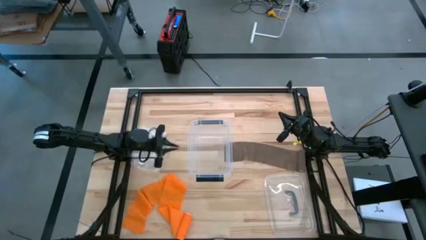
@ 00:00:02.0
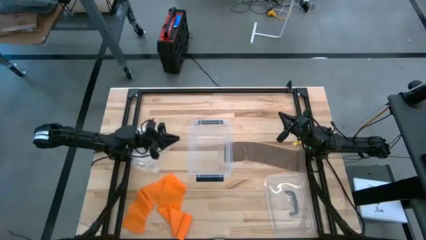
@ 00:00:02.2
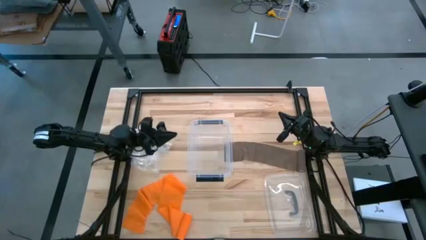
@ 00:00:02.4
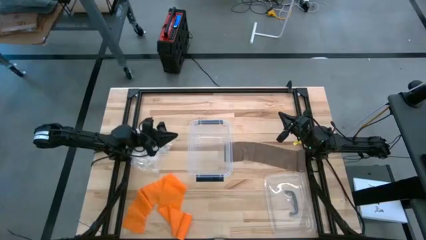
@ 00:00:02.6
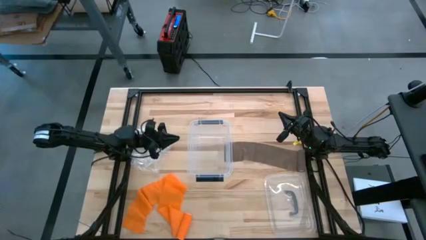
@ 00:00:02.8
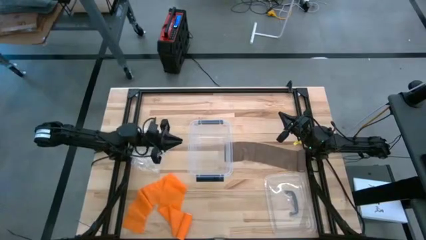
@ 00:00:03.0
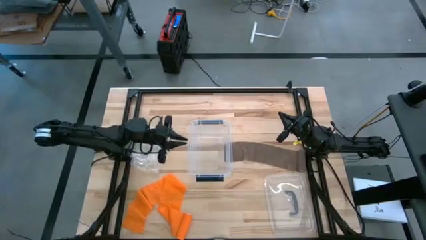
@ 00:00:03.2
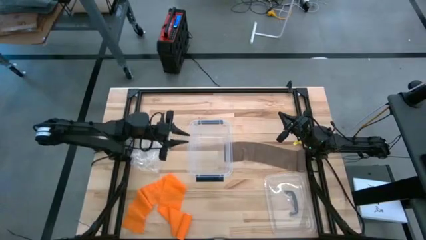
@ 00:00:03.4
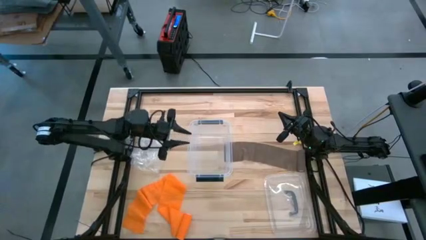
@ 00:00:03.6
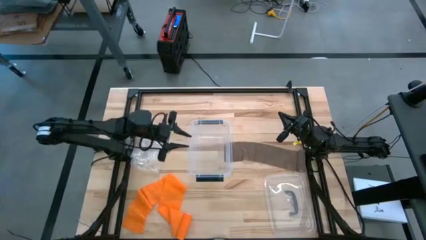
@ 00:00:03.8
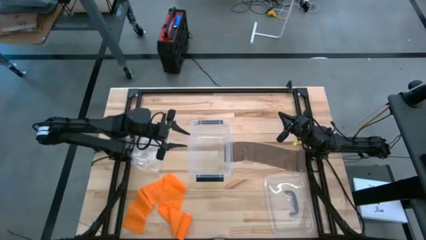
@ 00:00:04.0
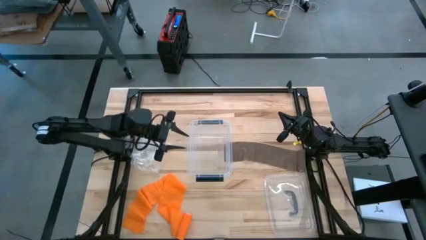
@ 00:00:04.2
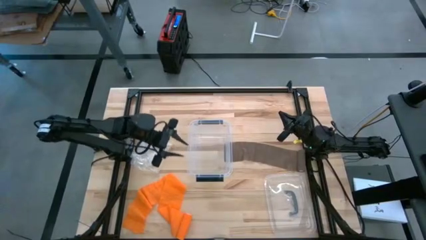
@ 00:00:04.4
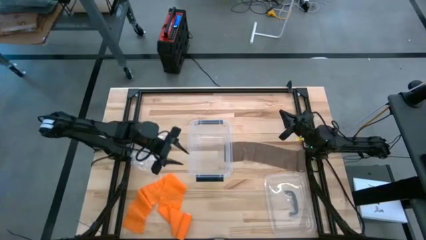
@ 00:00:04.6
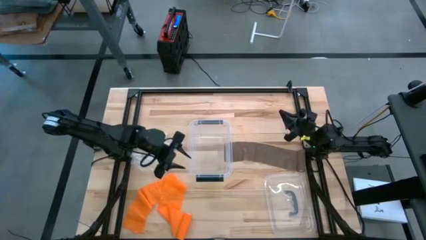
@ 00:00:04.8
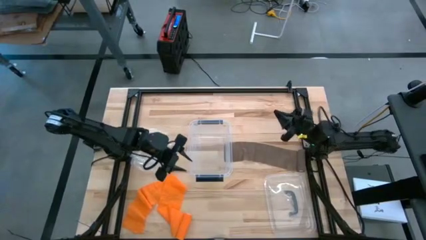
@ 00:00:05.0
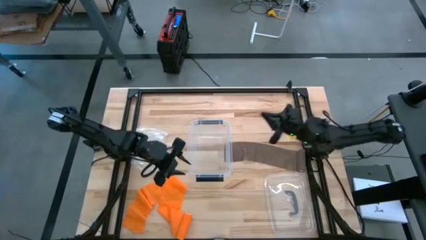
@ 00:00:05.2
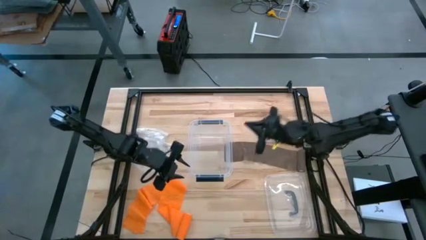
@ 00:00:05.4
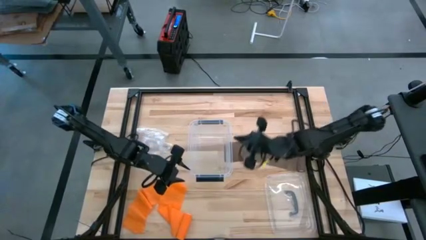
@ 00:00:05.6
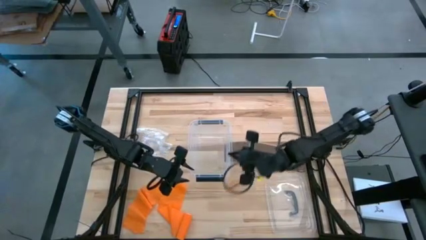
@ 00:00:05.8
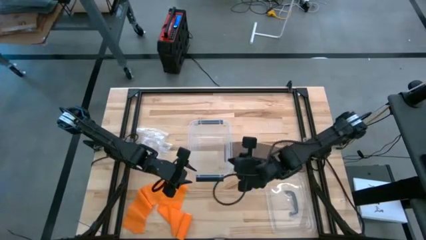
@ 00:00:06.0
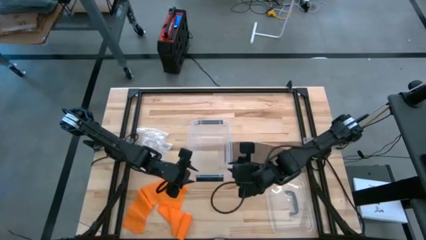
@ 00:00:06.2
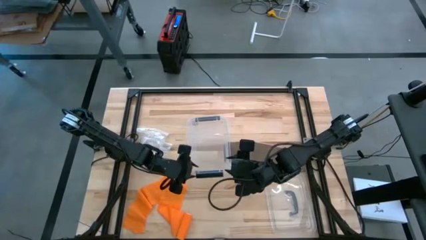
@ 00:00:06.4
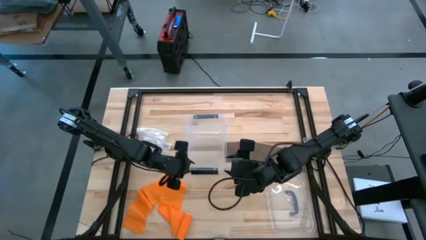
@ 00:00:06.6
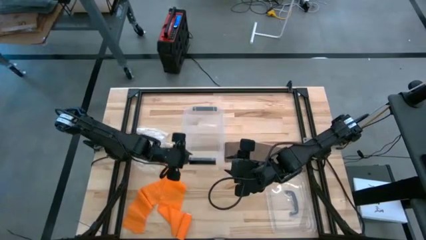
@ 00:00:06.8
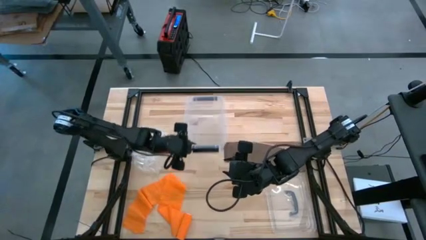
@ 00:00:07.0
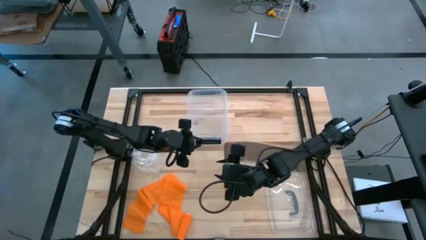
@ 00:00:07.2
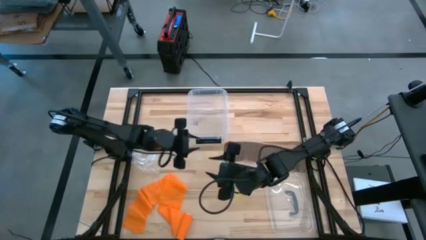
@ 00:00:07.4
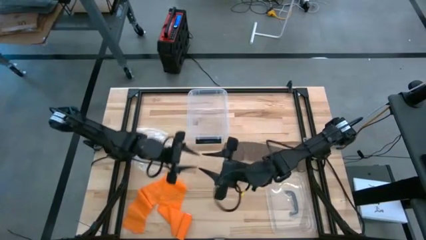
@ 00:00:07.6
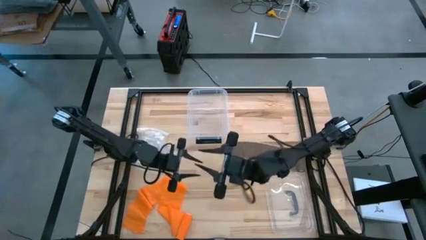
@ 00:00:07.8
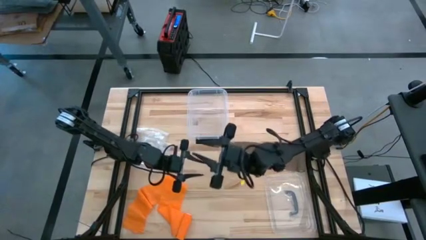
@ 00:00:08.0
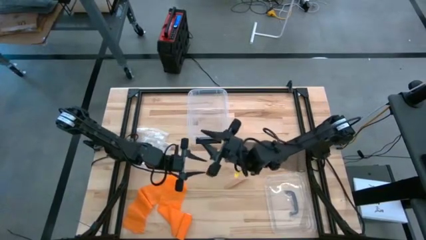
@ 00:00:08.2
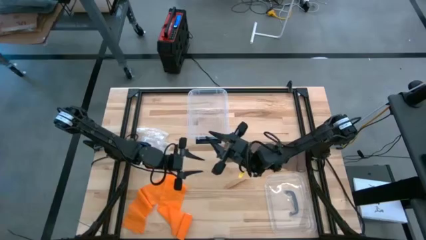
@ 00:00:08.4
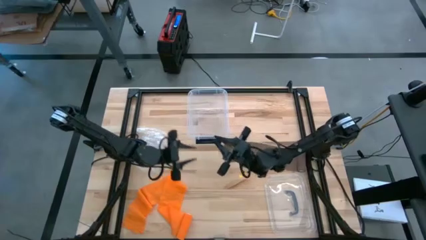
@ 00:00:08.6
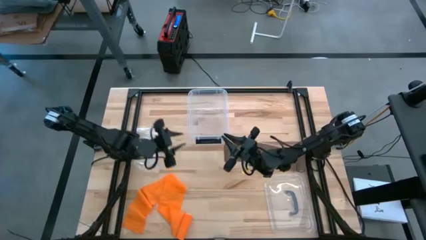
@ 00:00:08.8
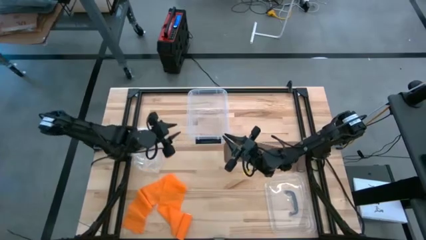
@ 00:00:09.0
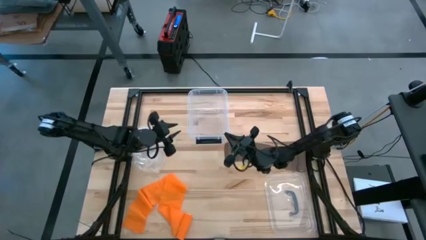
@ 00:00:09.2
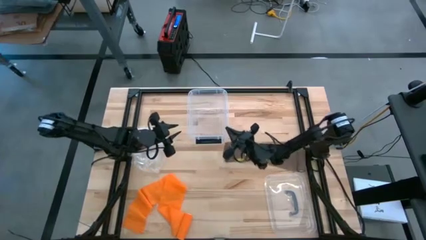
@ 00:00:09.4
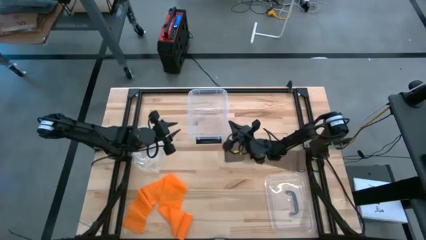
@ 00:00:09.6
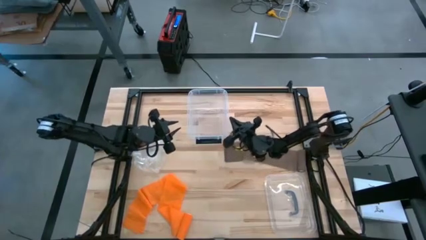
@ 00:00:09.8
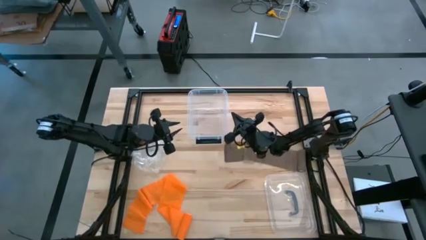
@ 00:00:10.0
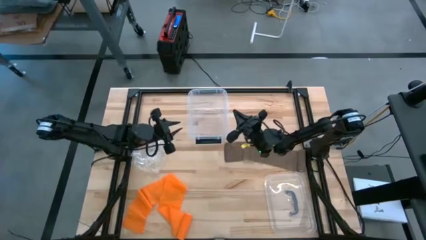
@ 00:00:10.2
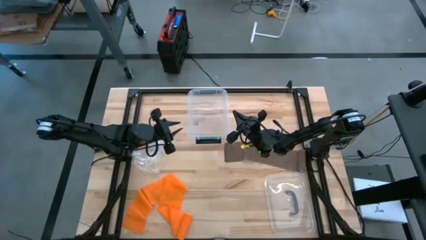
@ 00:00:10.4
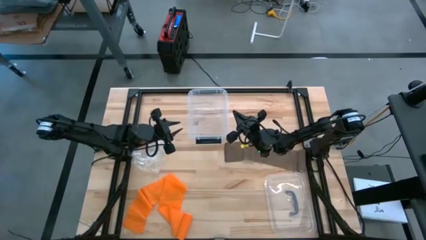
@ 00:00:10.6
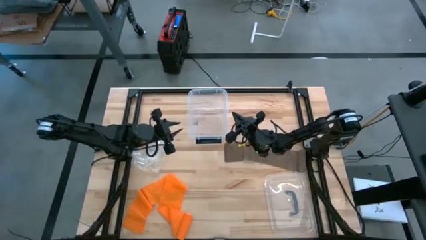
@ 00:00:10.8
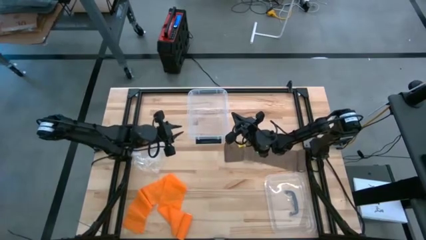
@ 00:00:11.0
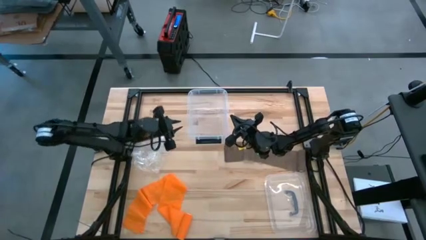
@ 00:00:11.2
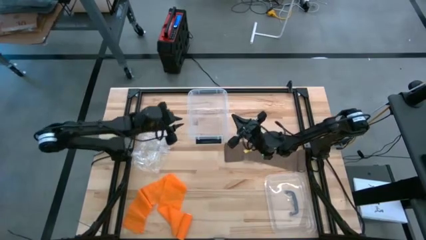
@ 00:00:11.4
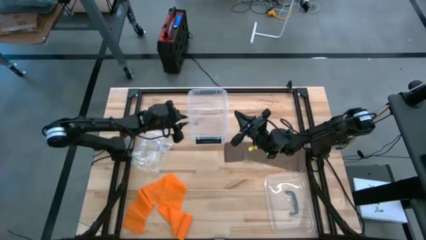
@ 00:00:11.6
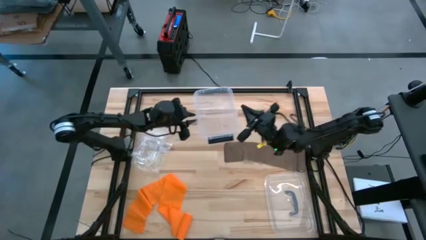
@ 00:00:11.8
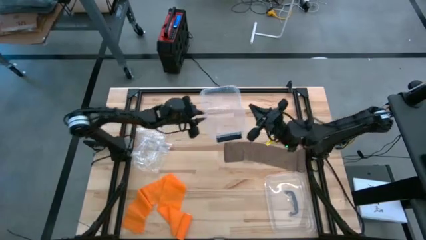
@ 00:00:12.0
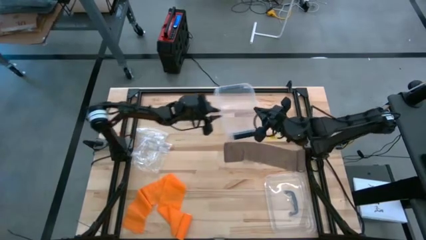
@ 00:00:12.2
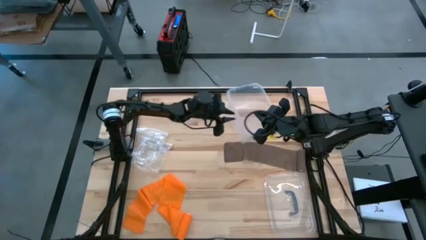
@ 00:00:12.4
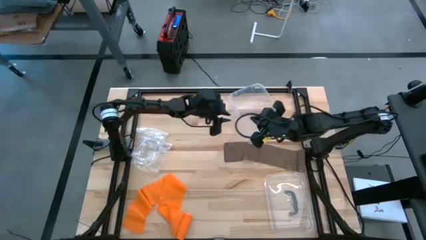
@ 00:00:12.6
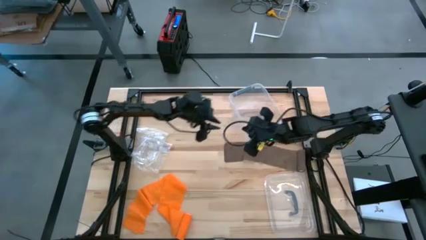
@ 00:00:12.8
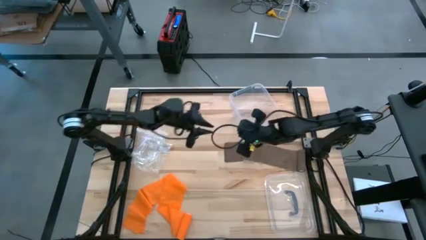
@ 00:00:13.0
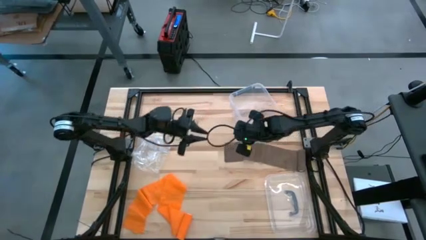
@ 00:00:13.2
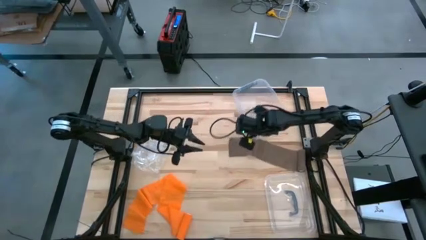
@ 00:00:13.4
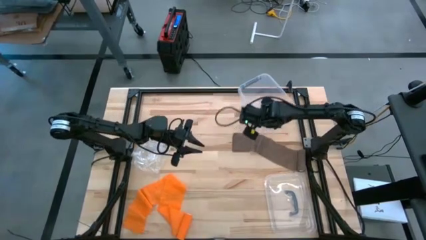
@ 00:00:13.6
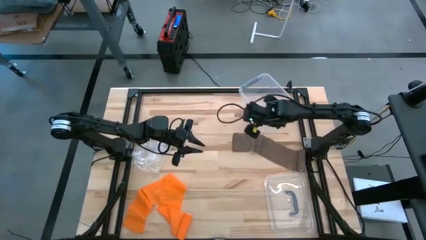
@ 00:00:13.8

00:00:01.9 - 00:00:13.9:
Task: Roll bandage
Move the transparent bin to the upper right corner of the table
